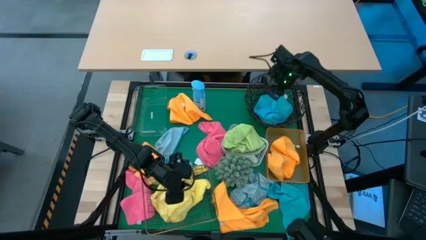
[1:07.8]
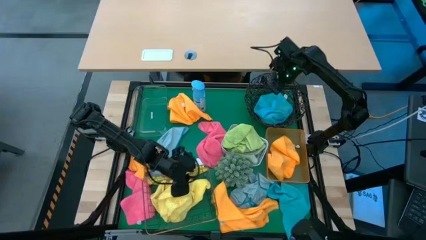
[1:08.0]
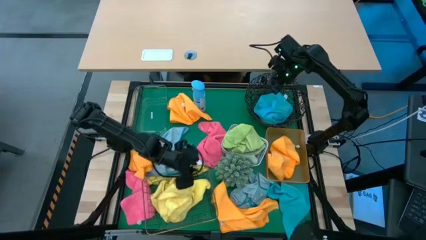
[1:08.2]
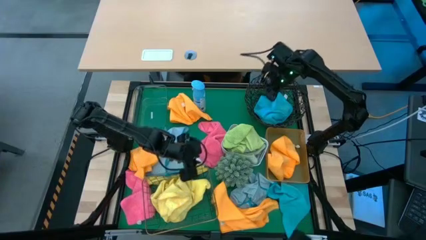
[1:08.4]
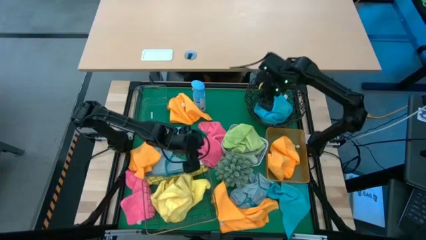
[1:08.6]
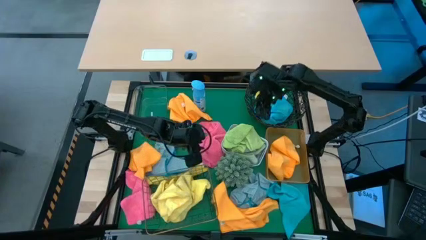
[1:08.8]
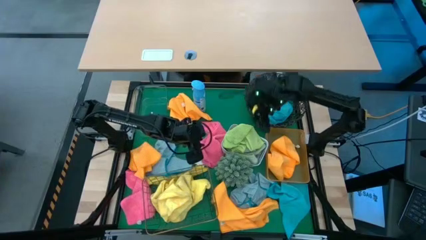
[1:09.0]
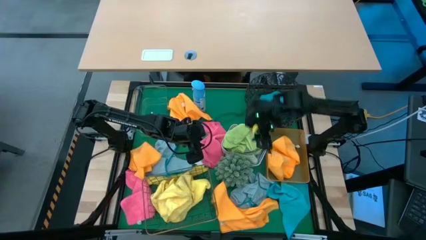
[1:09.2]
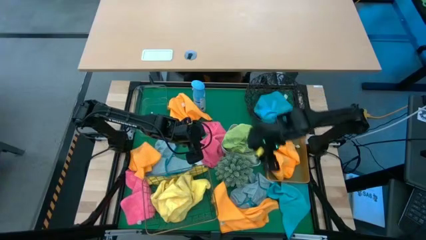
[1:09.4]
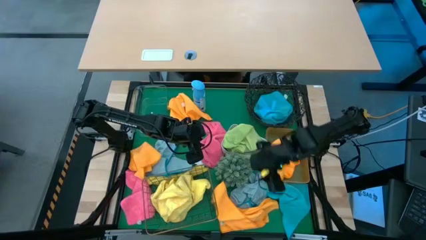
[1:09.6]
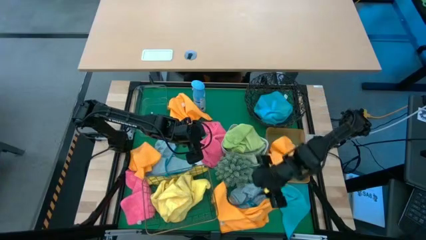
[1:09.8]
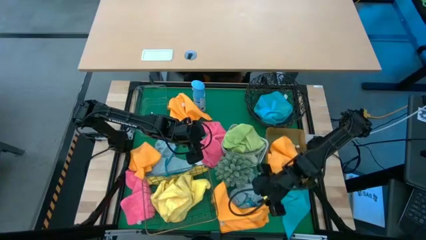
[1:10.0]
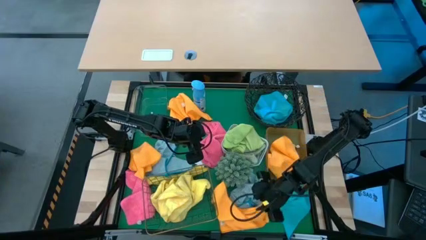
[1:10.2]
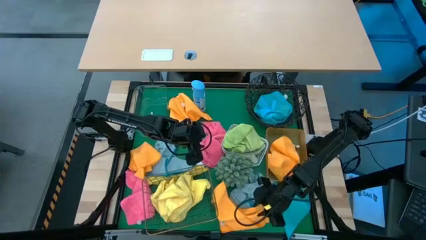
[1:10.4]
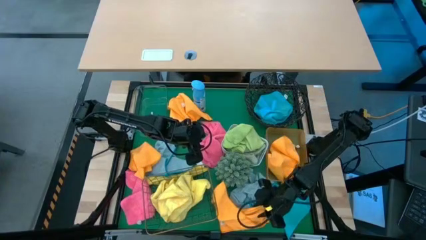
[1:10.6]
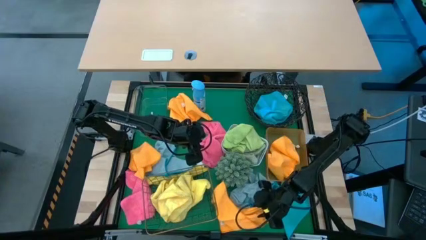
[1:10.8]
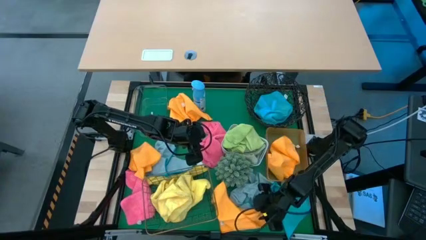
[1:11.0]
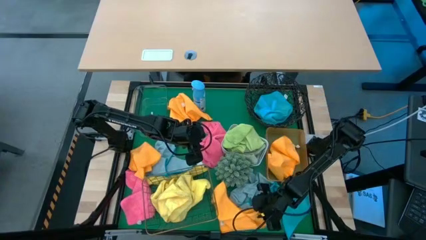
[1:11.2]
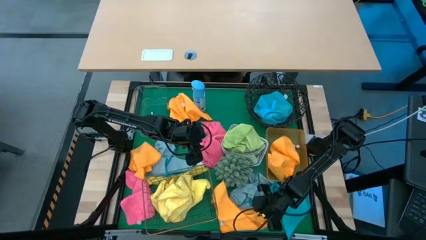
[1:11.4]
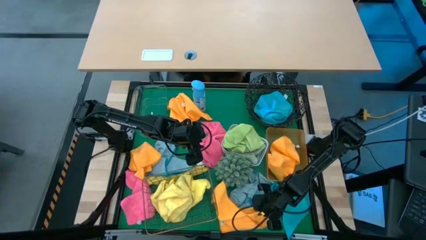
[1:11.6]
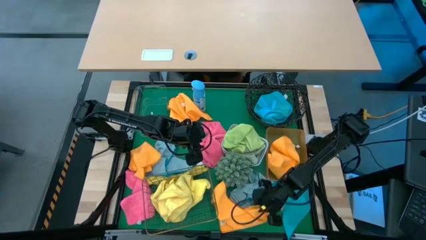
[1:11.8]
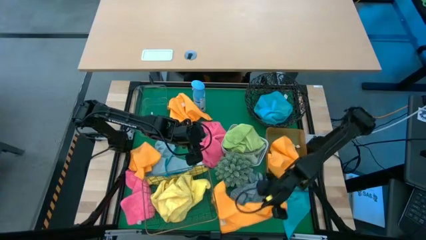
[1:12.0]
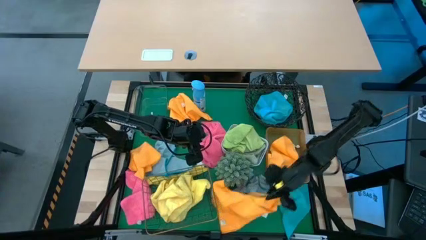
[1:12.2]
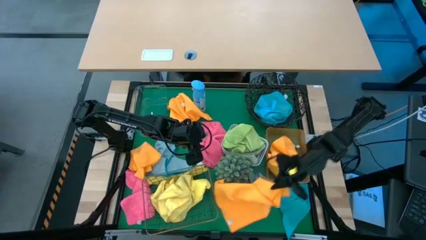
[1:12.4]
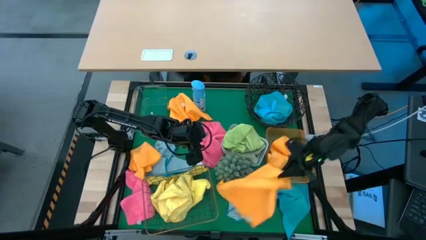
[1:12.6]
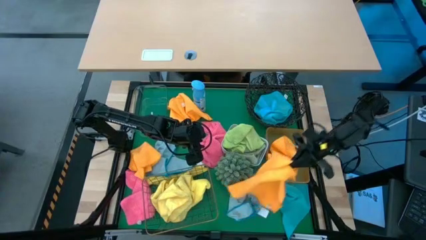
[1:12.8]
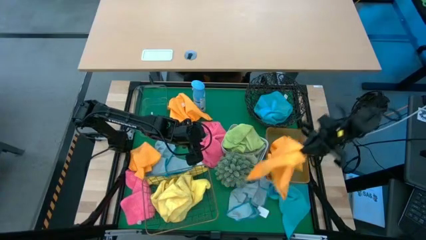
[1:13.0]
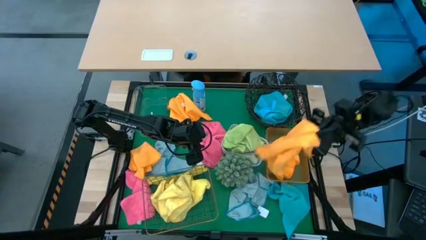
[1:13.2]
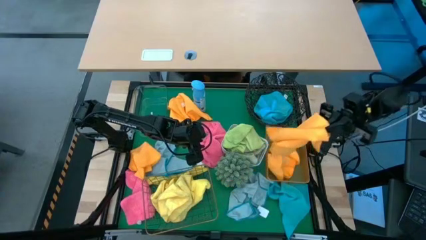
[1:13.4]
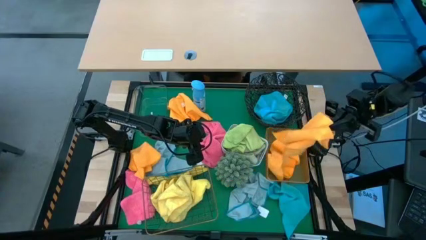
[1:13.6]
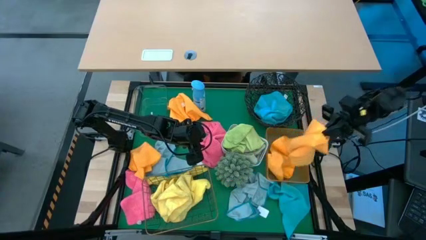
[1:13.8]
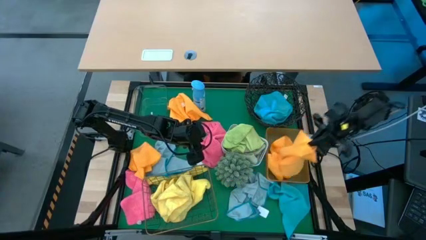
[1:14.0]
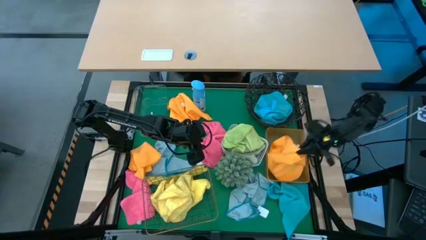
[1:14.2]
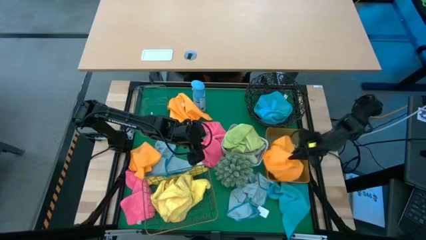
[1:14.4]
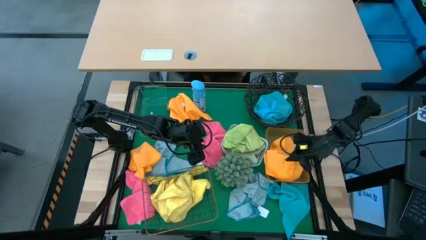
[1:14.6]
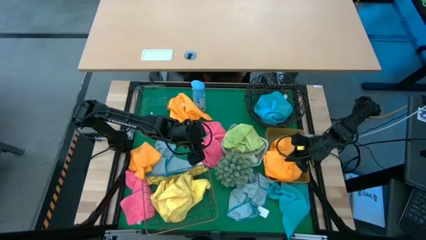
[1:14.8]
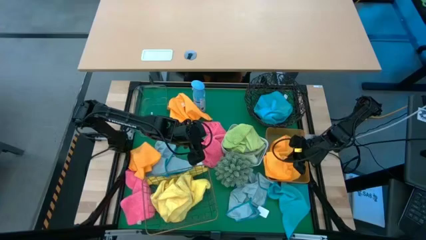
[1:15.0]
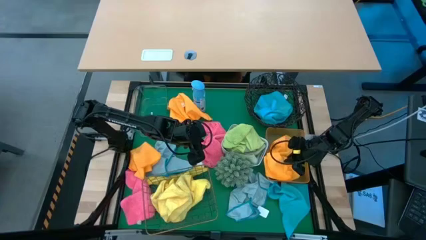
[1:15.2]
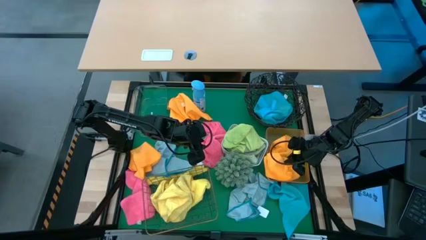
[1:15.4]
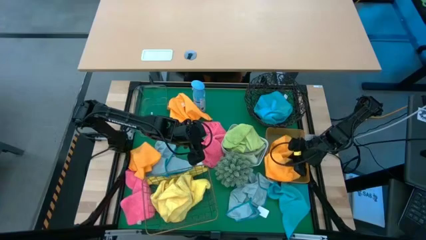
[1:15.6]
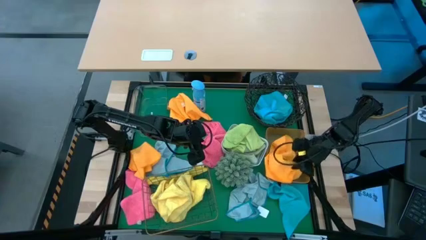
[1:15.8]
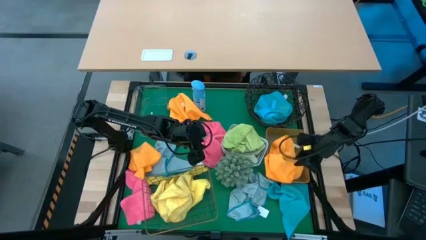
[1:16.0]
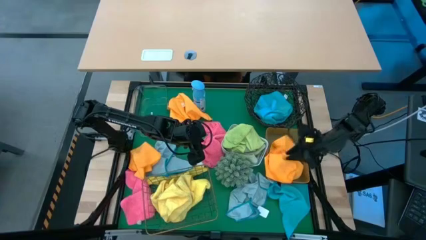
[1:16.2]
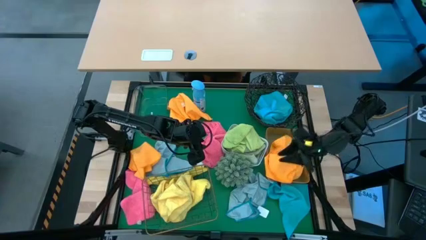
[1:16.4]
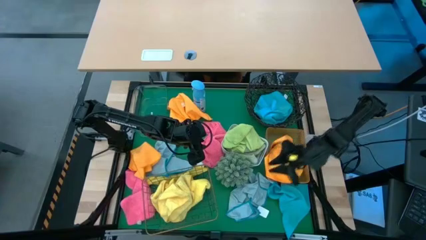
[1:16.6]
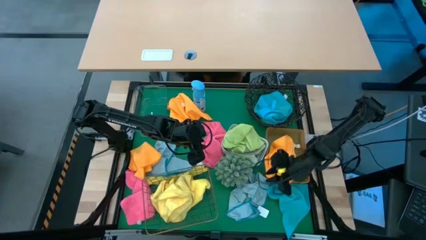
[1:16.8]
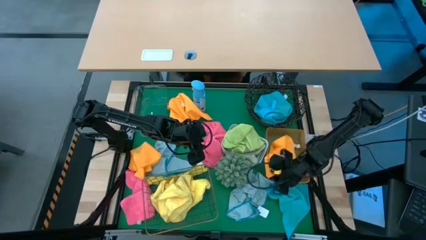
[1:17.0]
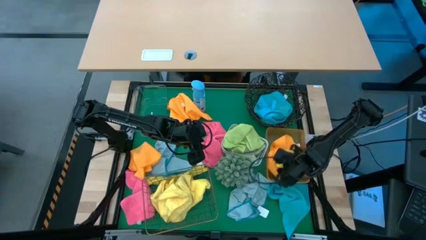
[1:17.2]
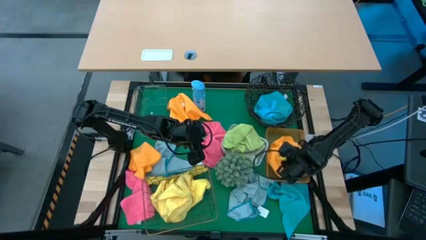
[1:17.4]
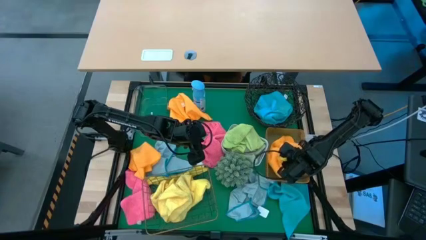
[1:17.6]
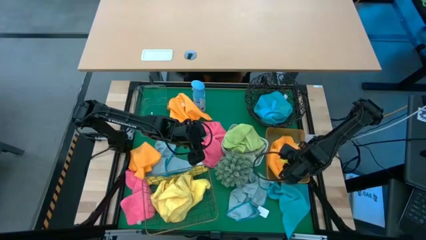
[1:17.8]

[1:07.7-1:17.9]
Task: Sort microfiber towel by color & place in baskets
Put the orange microfiber cloth into the orange bin

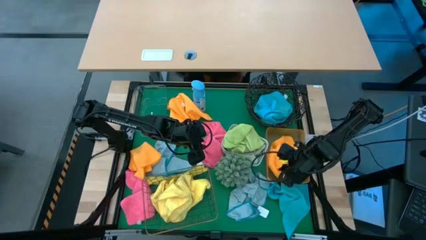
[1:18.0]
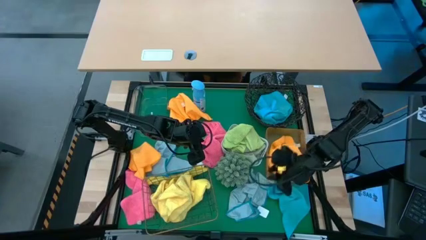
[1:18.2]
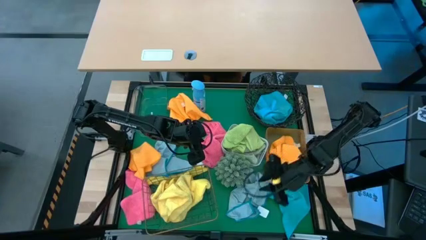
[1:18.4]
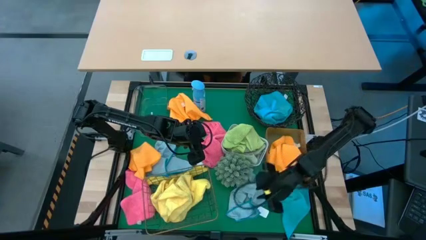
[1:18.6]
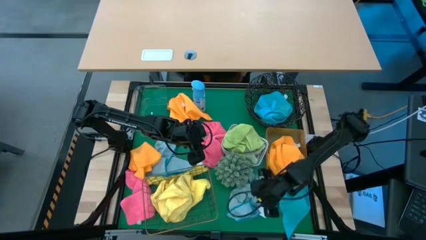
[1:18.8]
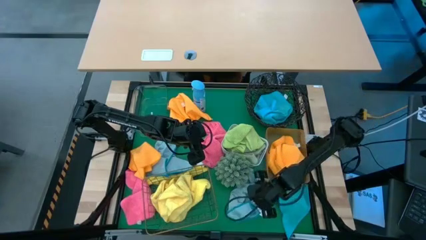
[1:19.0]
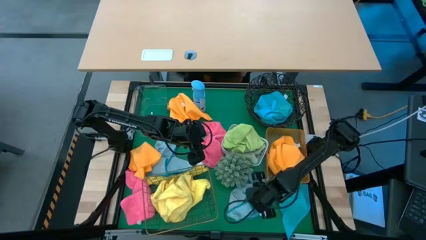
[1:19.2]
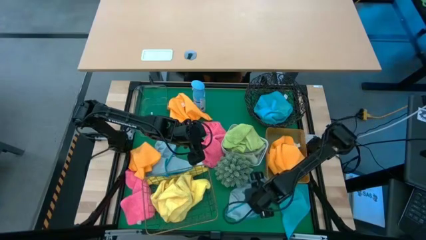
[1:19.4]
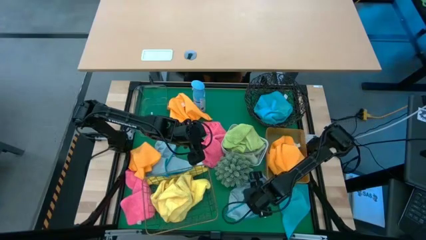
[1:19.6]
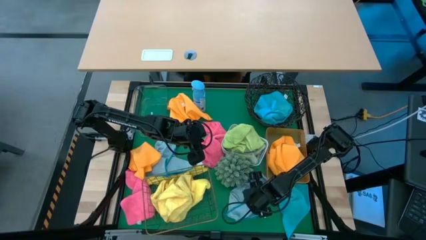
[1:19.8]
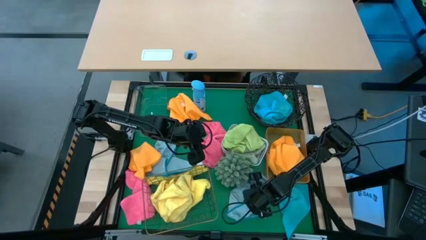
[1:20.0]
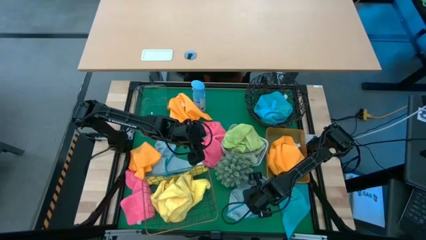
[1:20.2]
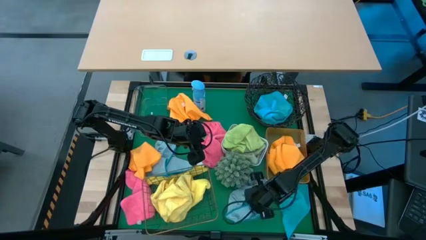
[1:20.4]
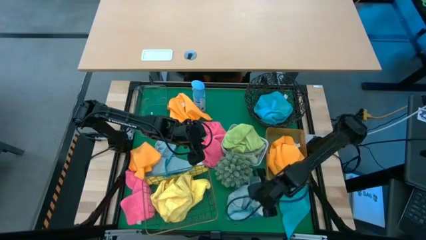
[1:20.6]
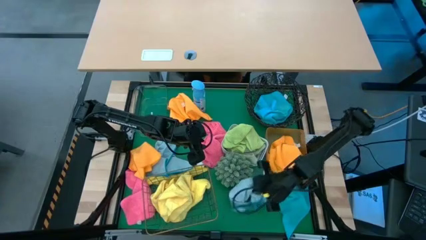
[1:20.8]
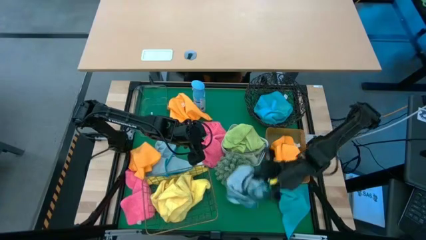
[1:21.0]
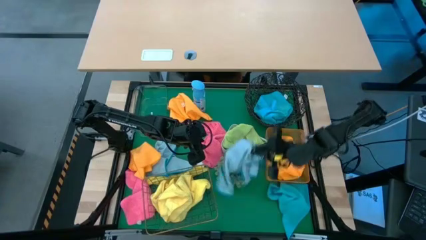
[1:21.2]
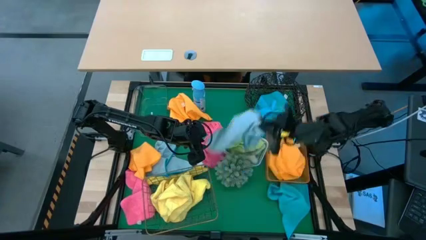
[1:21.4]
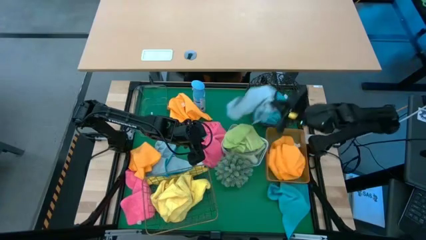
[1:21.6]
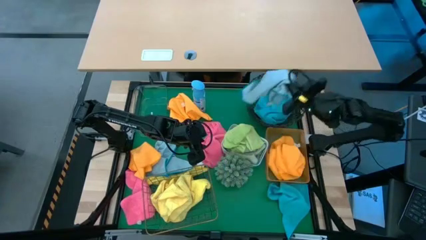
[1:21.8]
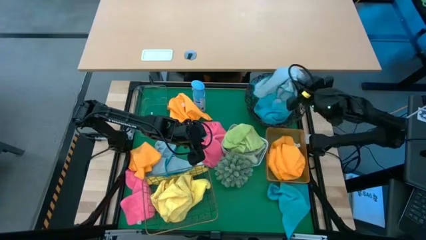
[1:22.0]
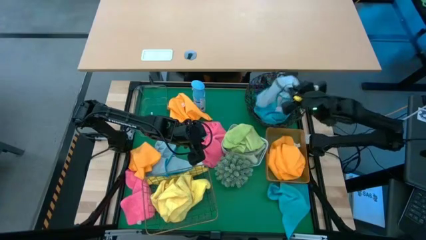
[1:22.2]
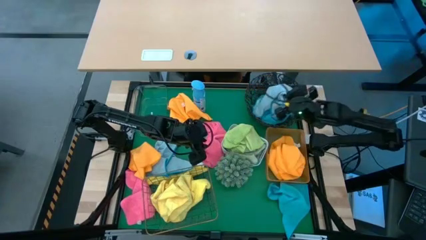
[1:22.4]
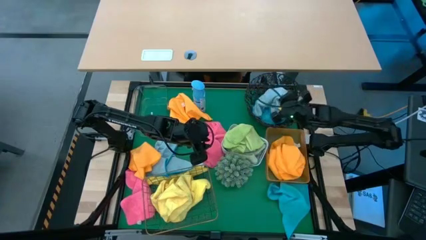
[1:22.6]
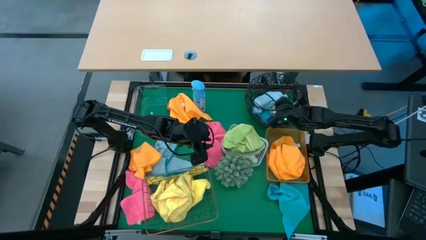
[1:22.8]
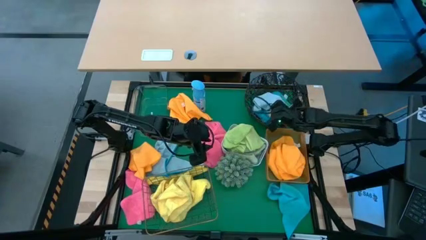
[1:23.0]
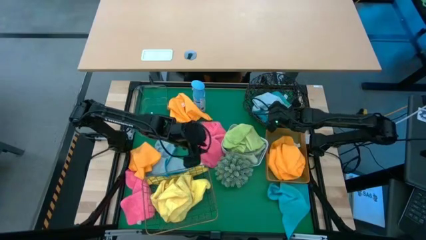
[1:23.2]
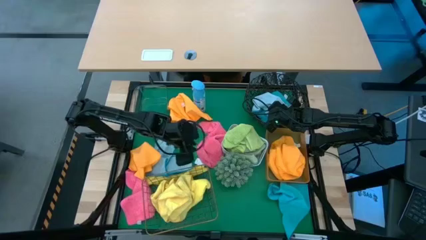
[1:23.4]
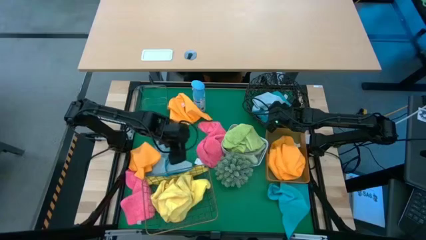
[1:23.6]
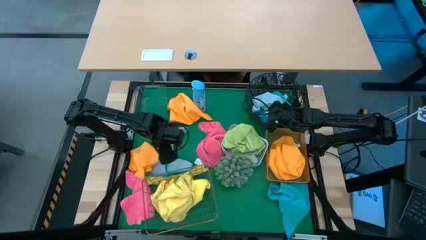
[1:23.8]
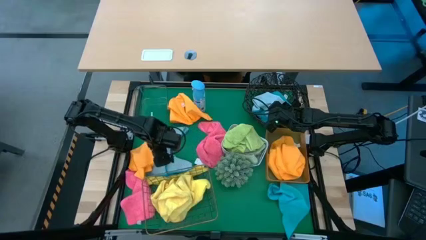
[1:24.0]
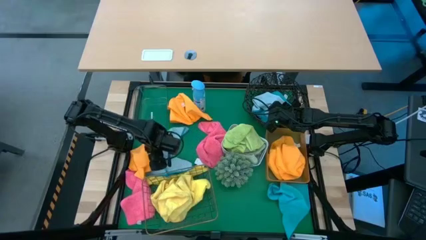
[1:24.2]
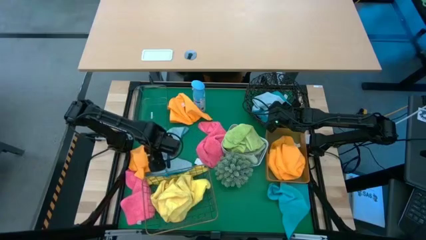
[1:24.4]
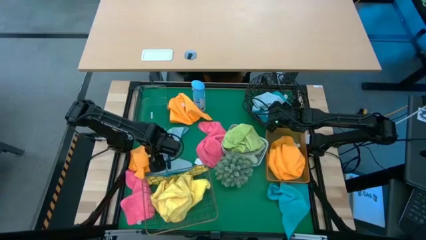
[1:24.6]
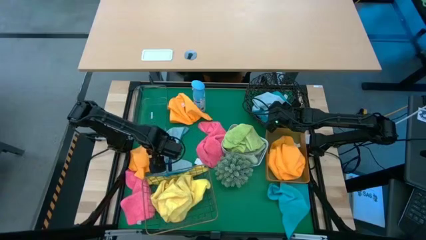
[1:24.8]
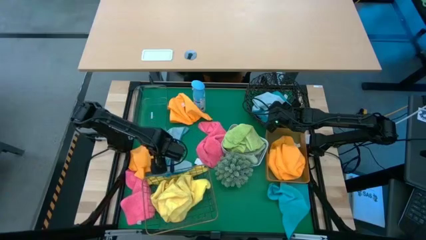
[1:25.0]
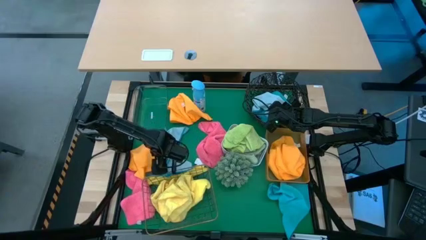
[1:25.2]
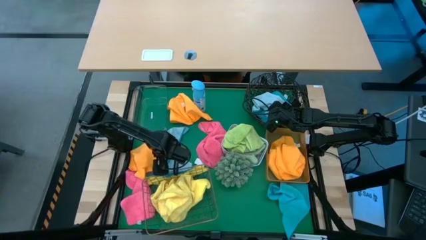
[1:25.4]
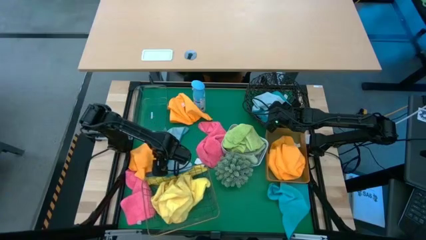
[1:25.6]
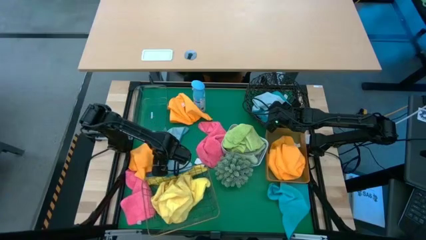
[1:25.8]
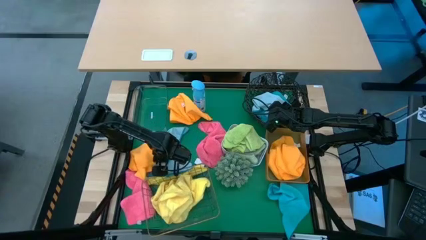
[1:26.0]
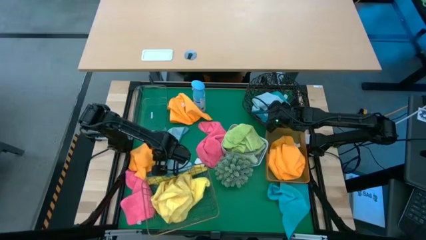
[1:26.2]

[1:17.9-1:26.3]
Put the blue microfiber cloth into the black basket
